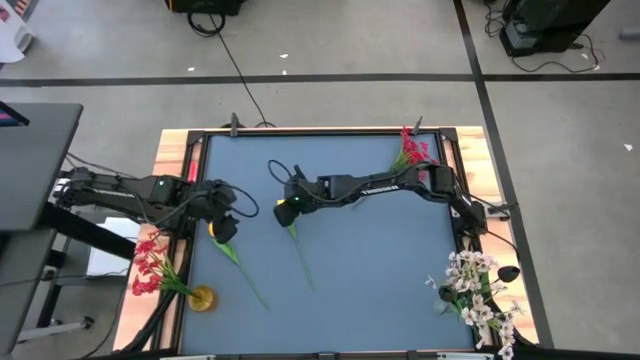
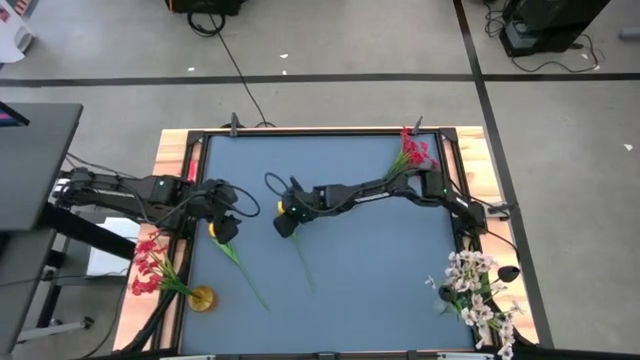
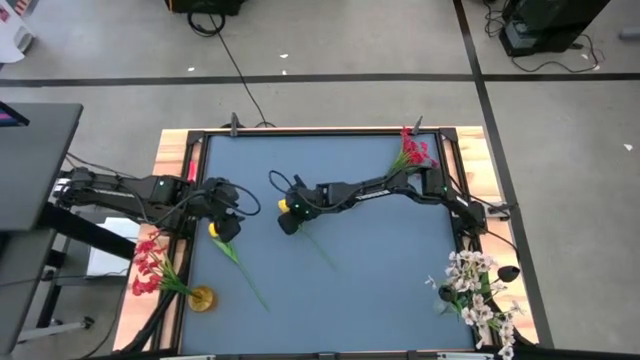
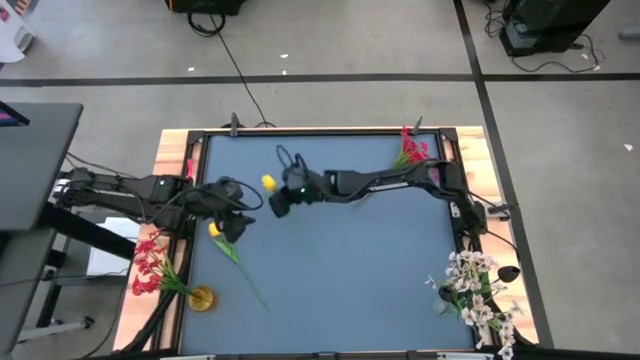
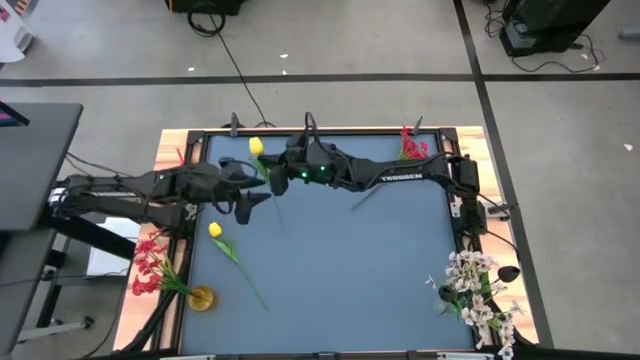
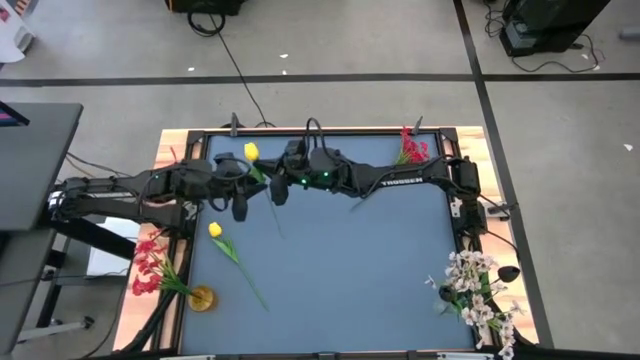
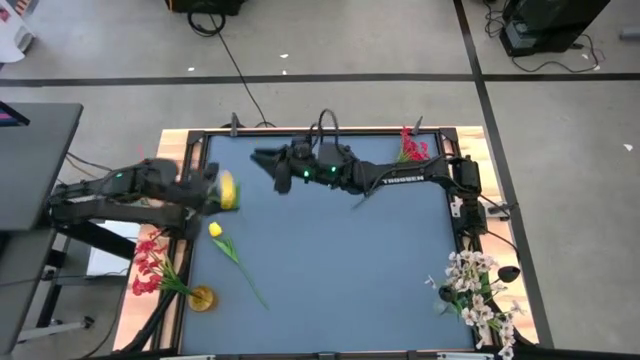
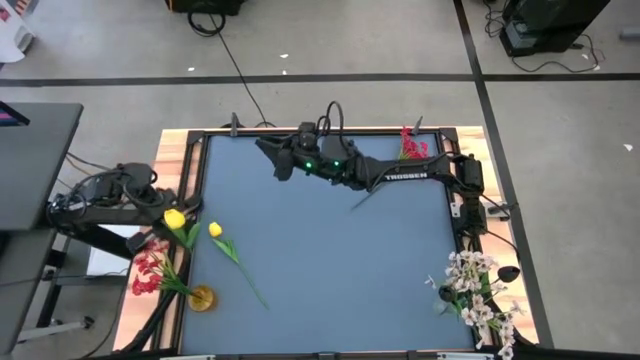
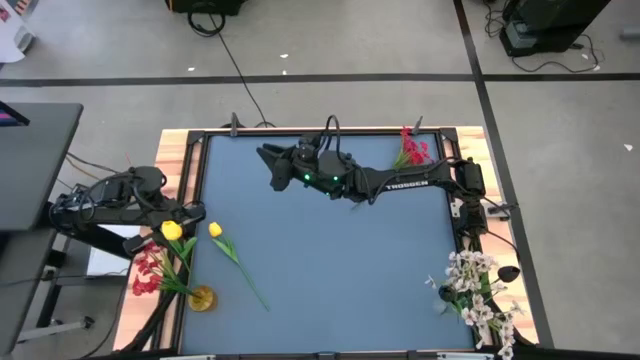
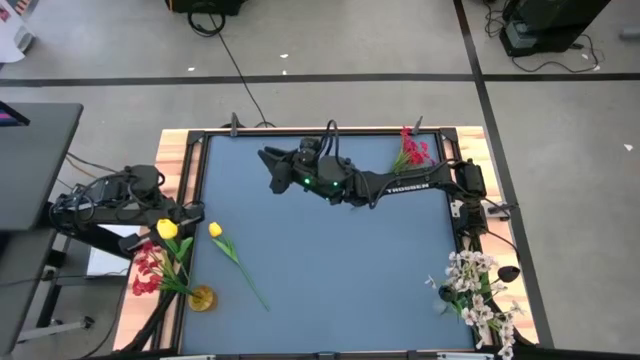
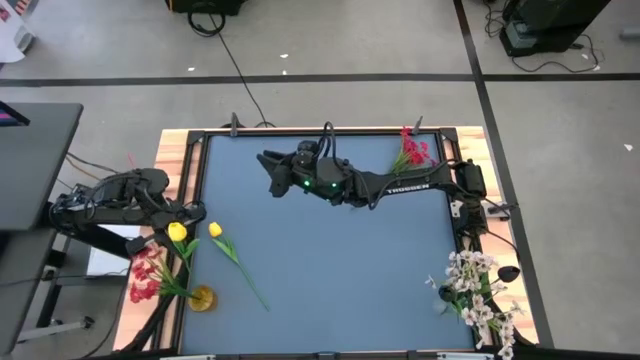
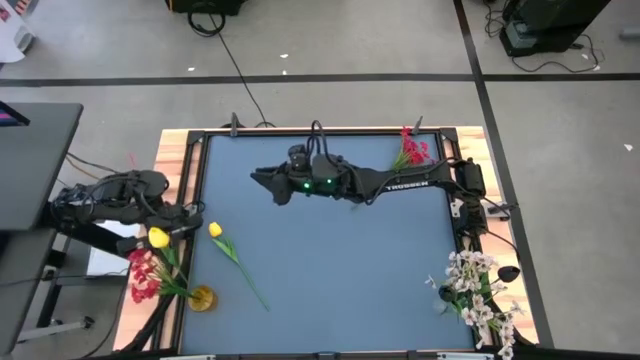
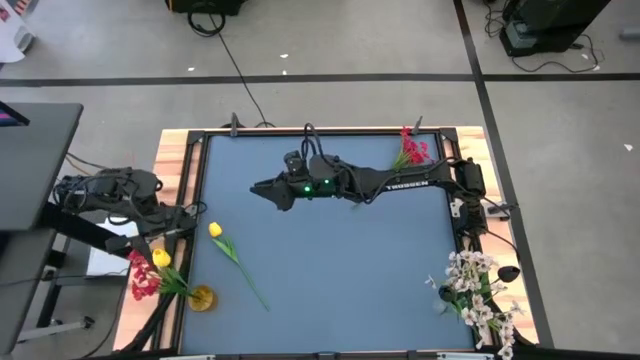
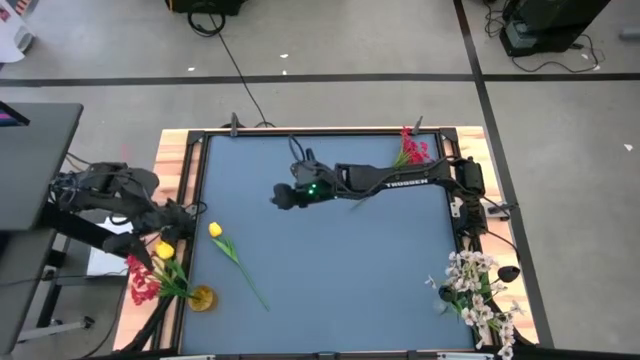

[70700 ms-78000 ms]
Task: Sort flowers into vase by color
Put the right yellow flower into the yellow vase

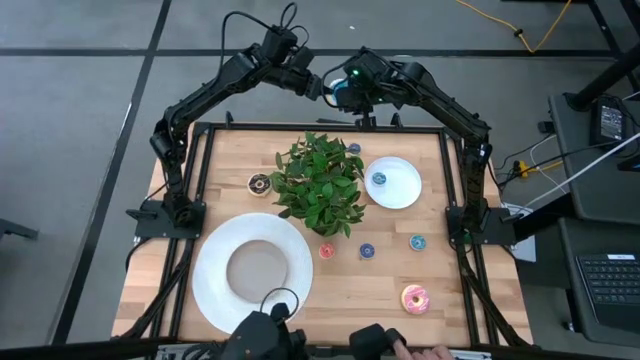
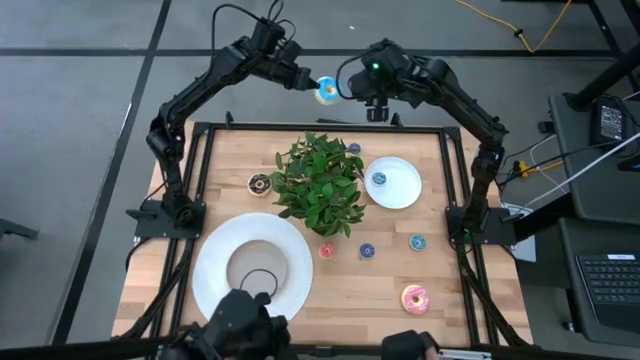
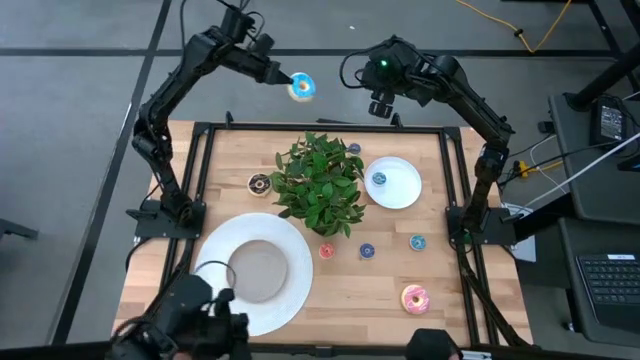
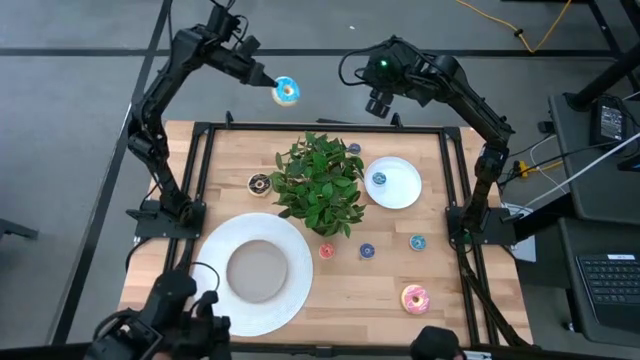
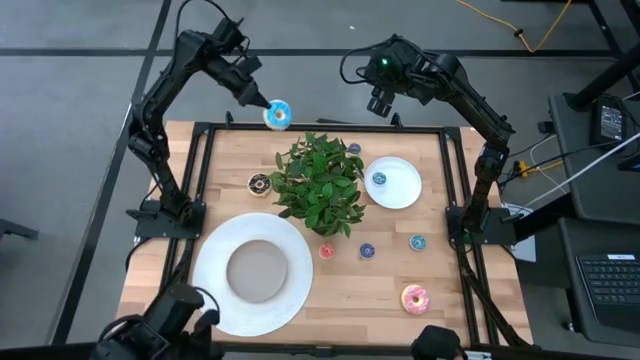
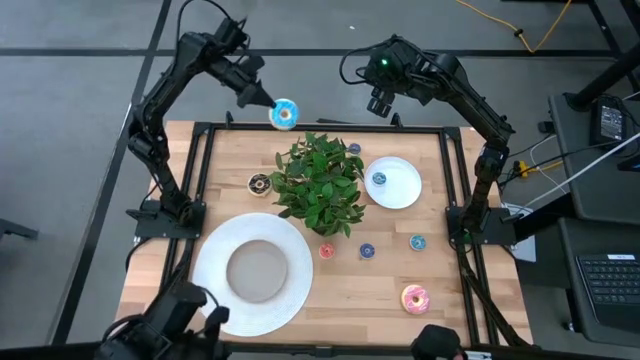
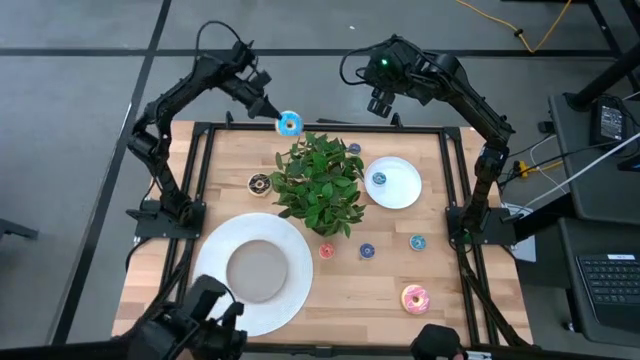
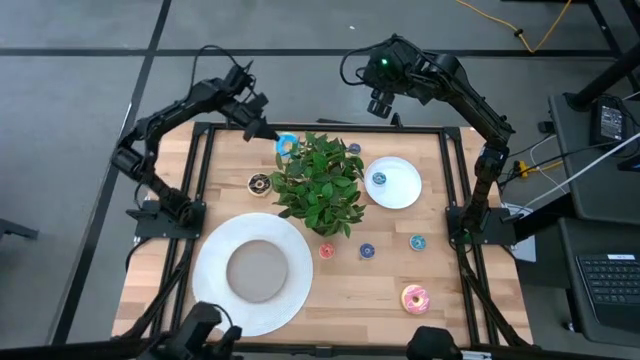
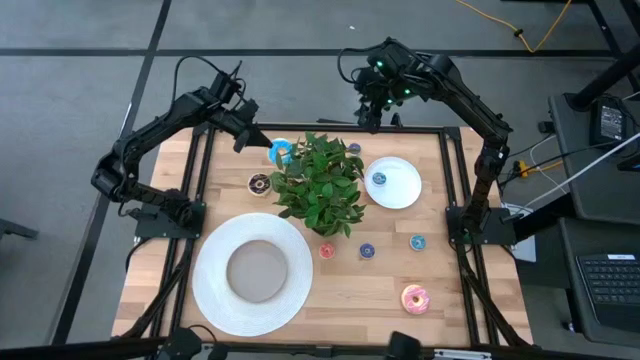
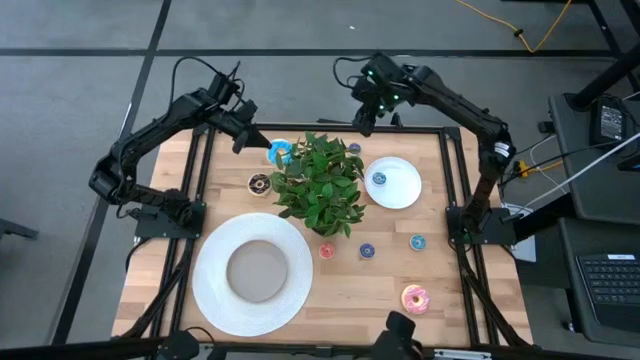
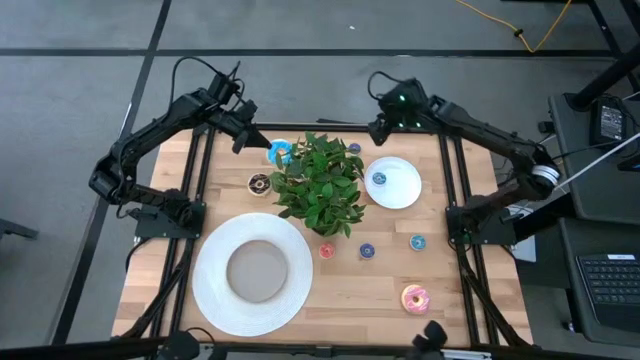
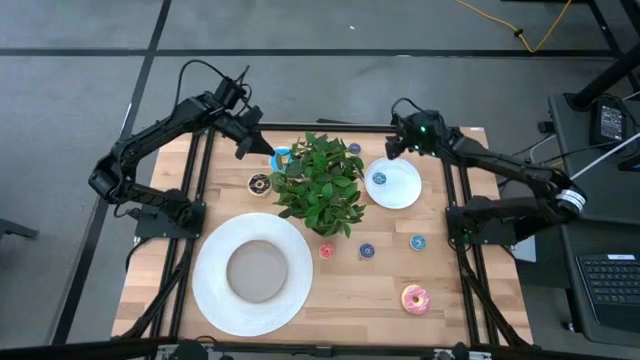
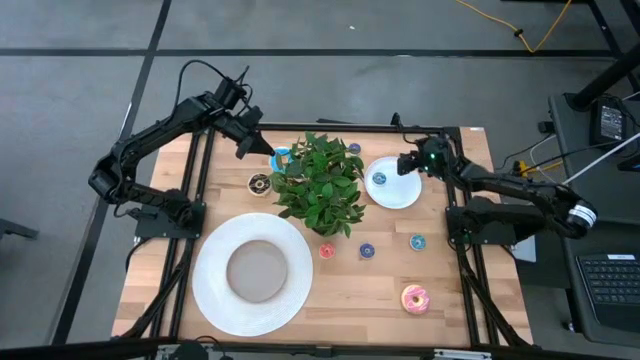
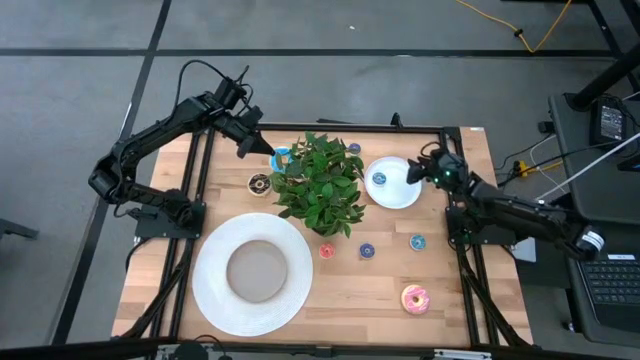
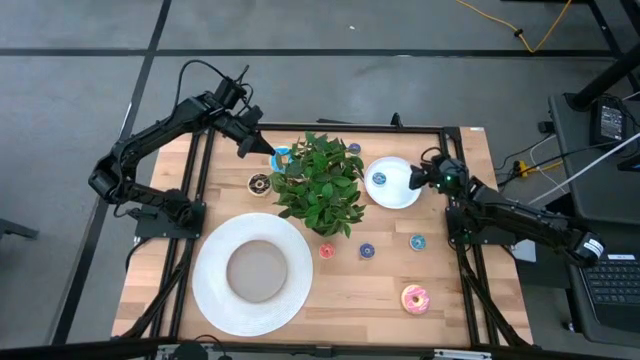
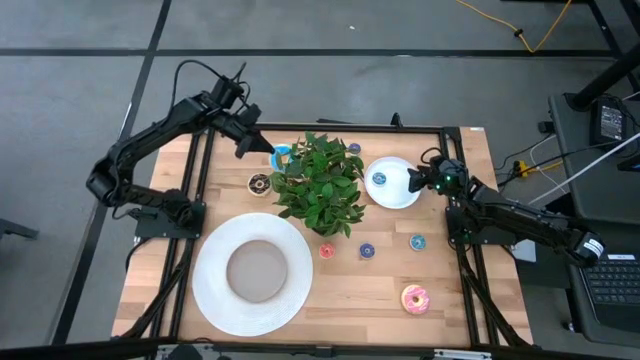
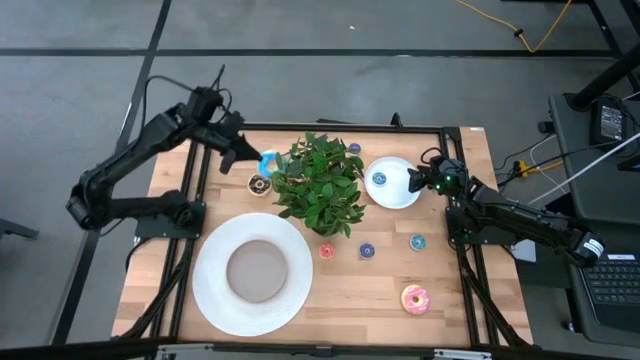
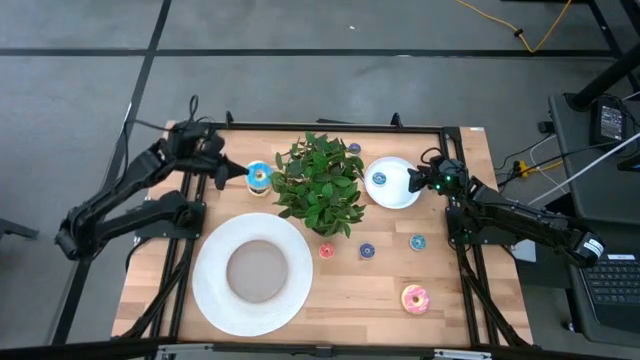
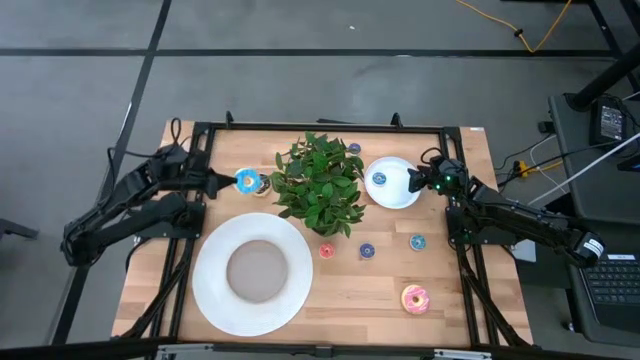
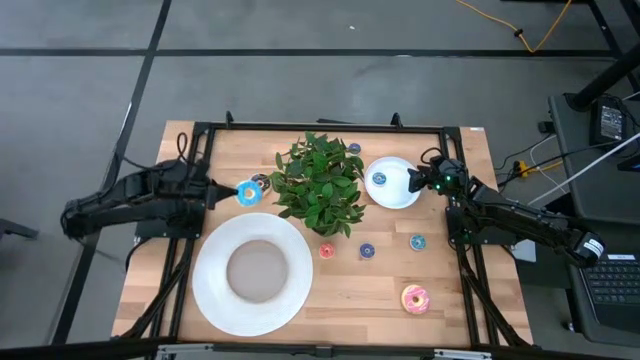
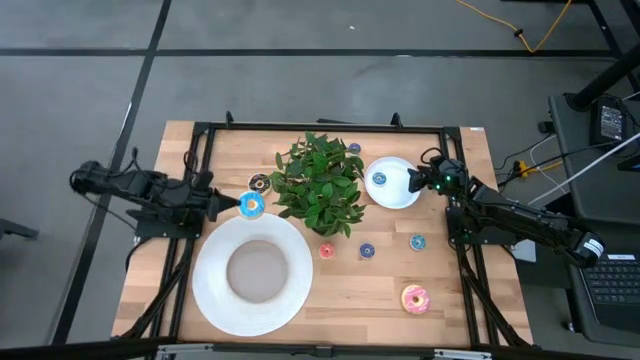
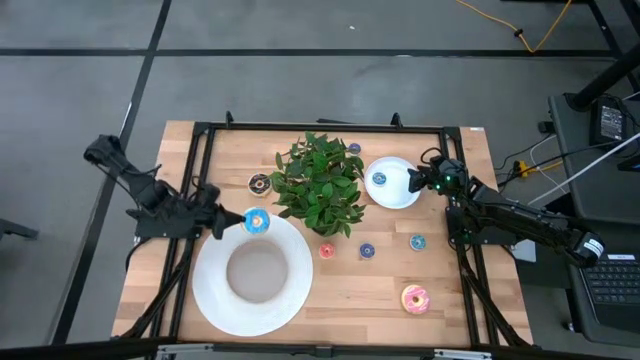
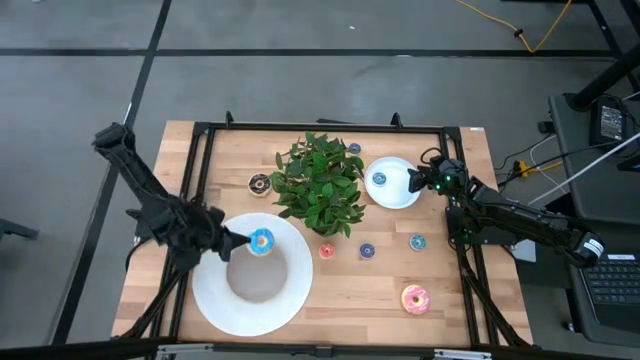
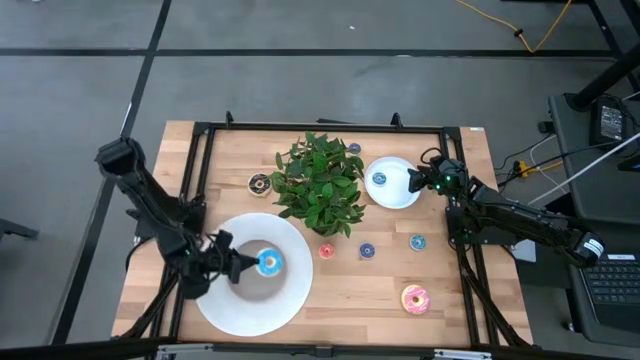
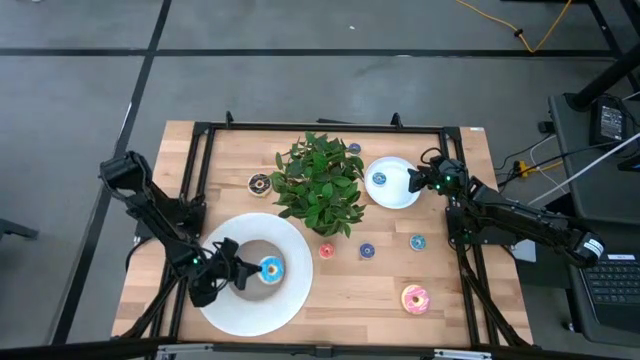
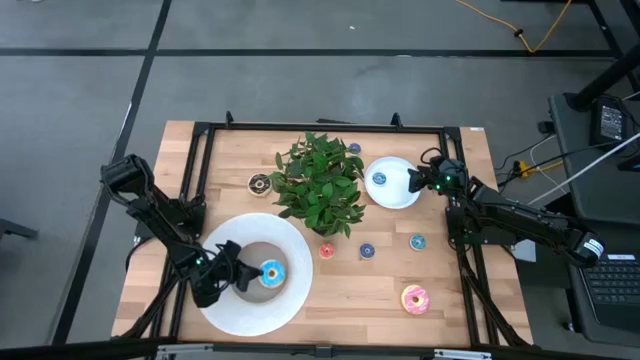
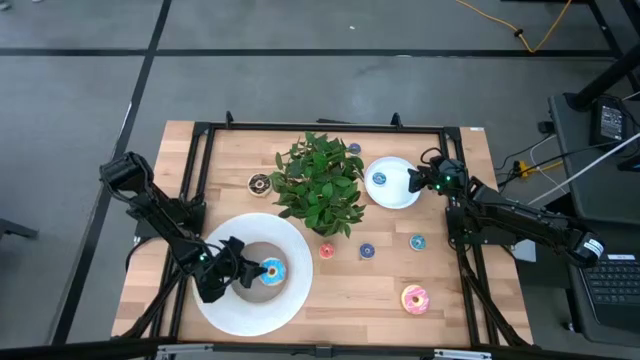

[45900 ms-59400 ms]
Task: Pick & Place donuts
Put the large light blue donut on the brown plate
